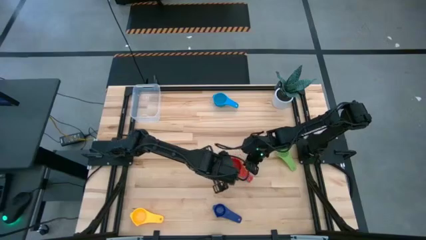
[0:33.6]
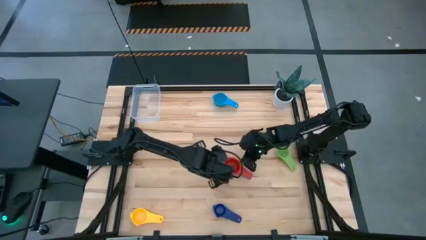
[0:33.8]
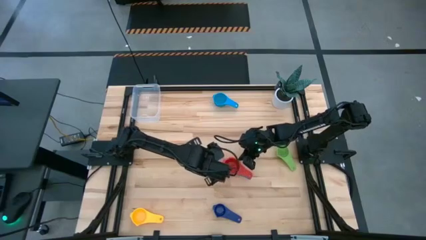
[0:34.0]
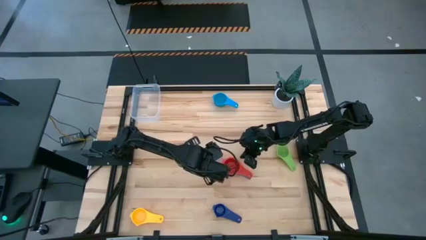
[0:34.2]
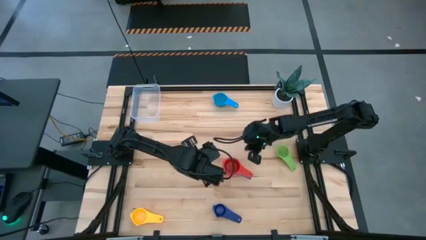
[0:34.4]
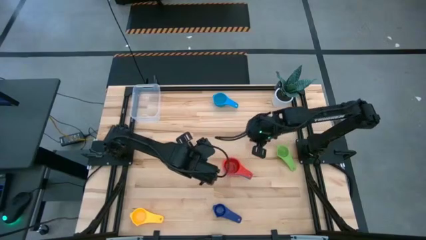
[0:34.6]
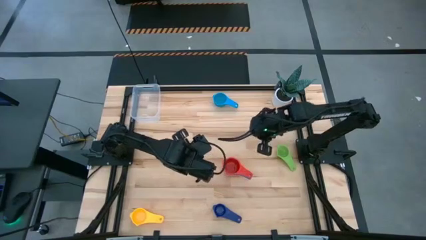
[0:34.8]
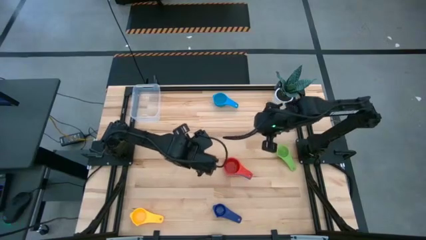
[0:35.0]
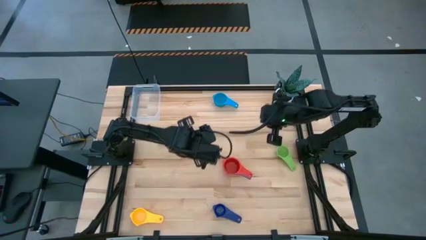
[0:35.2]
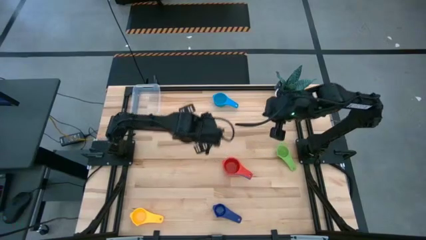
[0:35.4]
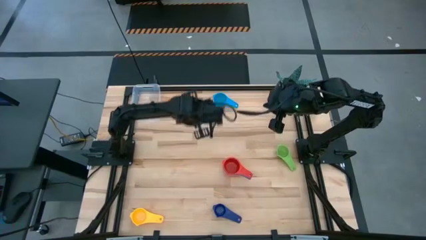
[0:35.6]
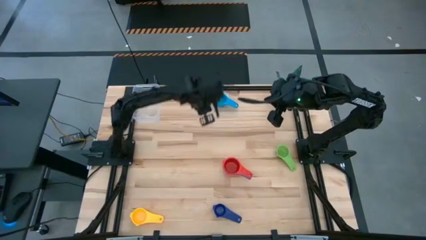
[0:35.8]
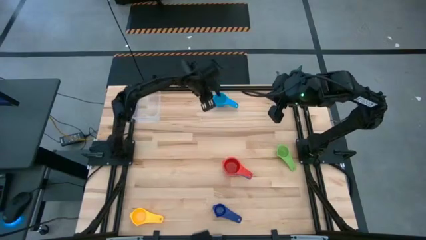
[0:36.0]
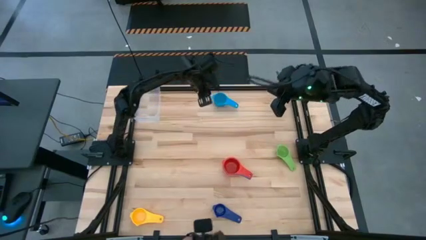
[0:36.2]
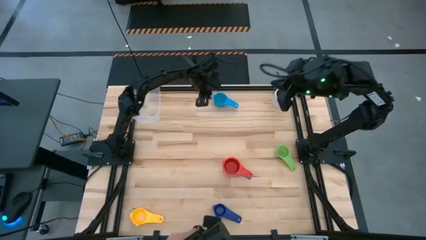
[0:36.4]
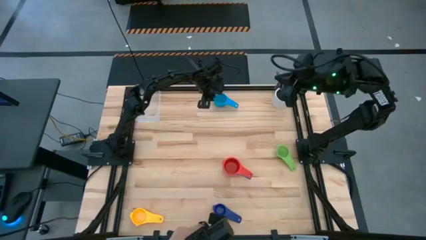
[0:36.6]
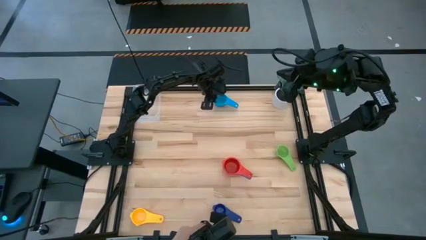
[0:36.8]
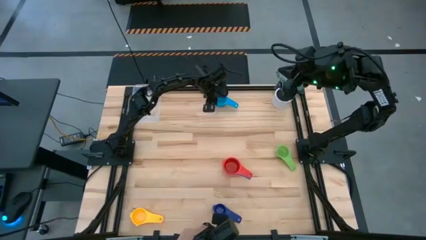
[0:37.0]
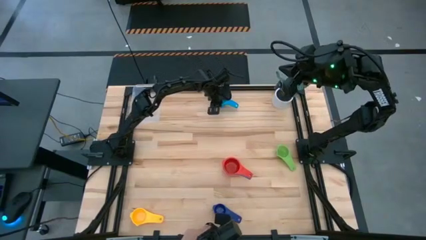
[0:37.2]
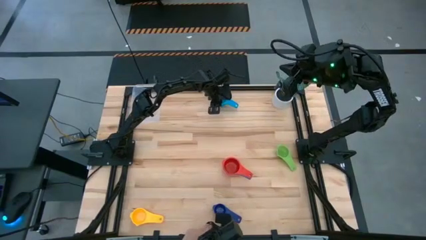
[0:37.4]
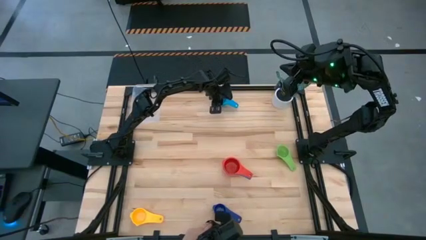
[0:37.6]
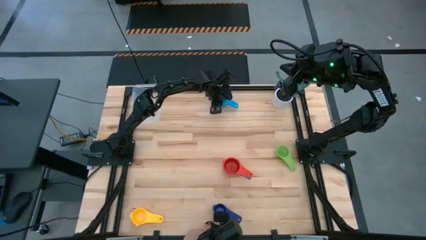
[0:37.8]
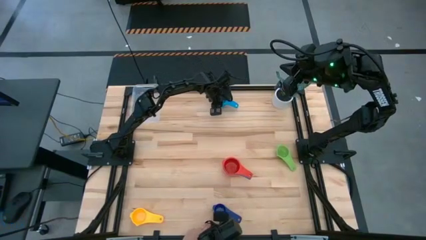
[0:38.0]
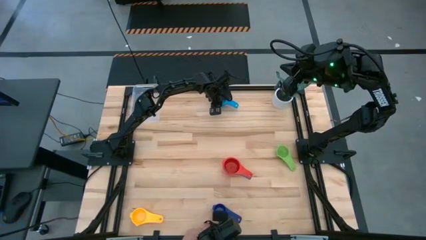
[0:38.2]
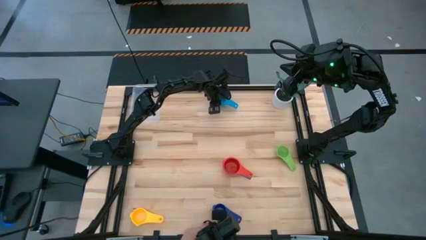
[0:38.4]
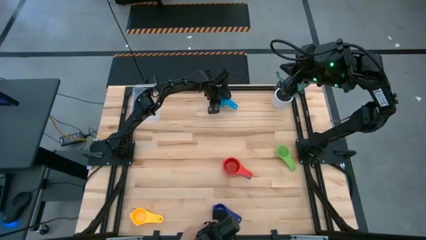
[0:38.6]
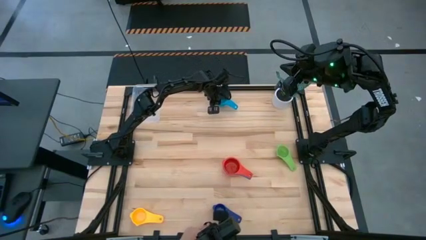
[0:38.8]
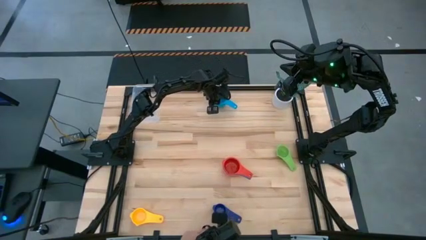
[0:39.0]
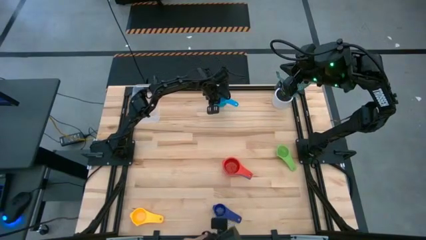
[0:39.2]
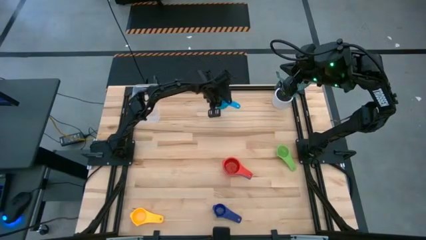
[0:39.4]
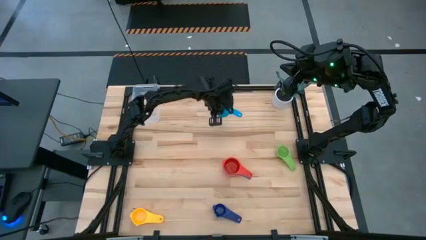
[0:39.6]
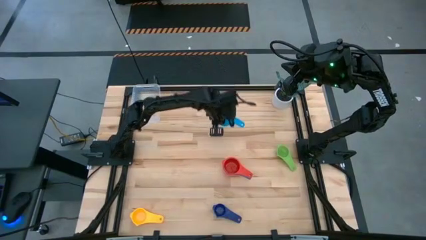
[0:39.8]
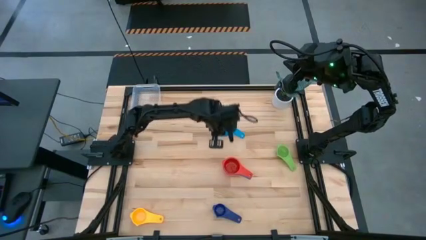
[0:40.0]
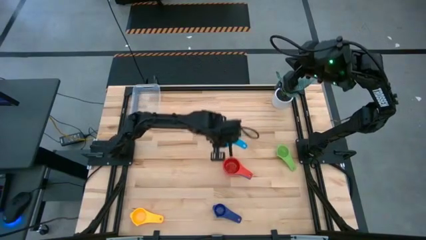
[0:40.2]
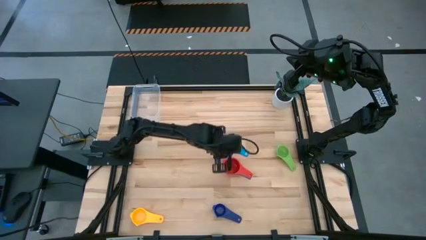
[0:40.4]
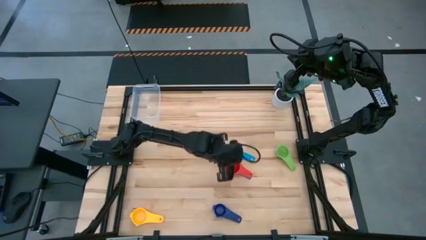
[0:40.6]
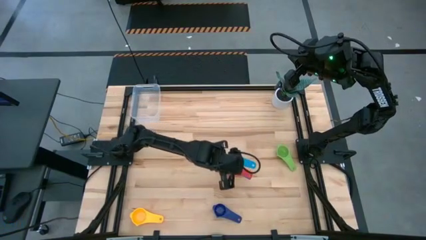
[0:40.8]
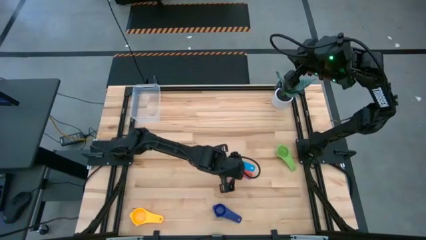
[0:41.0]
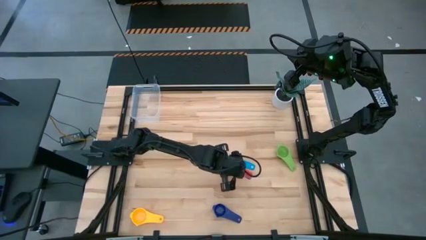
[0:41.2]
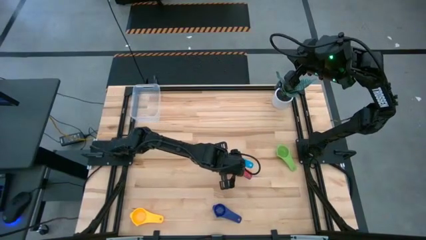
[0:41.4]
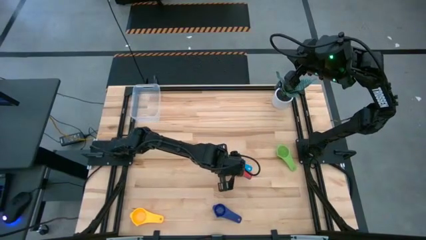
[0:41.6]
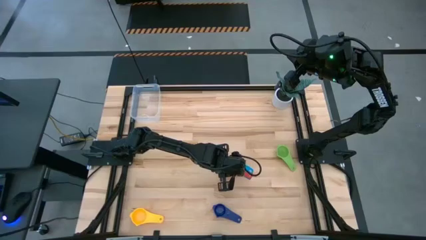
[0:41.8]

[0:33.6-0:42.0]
Task: Nest measuring cups in basket
Stack the light blue measuring cup on the red measuring cup

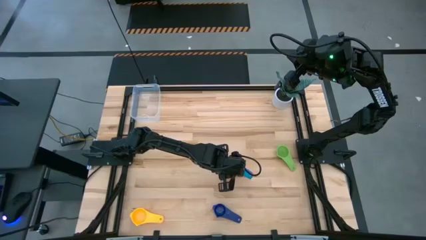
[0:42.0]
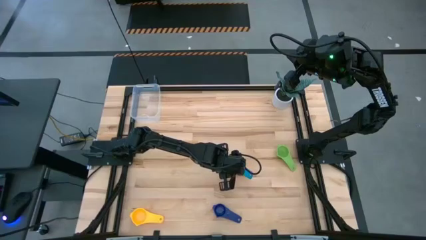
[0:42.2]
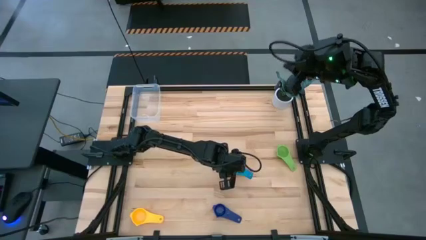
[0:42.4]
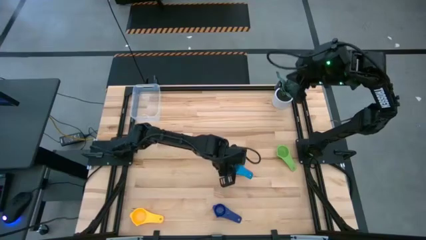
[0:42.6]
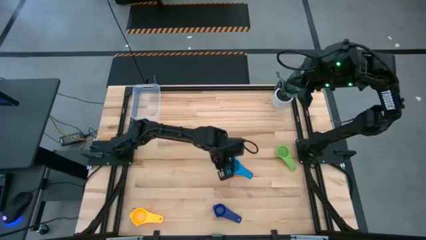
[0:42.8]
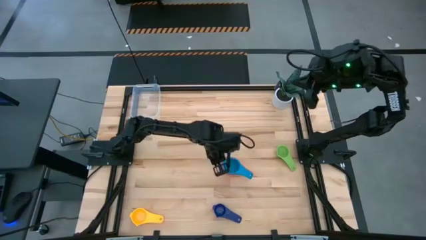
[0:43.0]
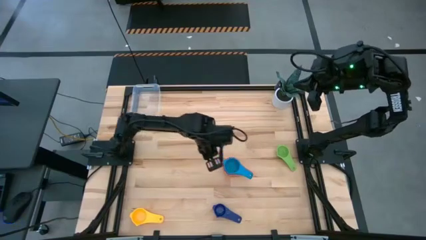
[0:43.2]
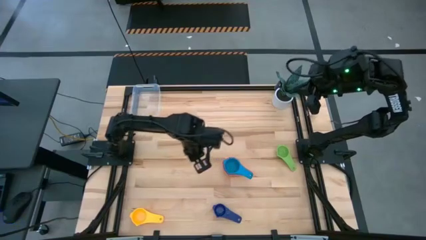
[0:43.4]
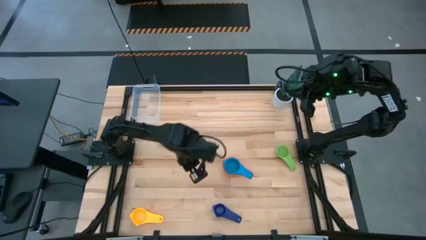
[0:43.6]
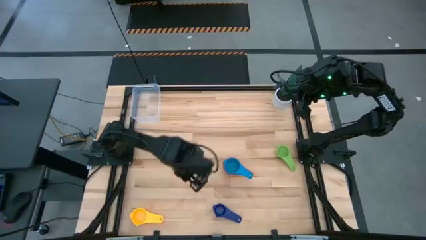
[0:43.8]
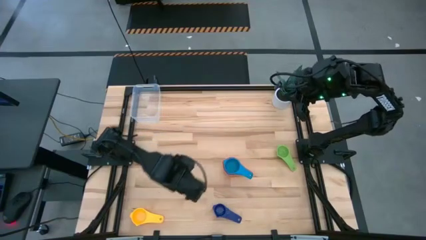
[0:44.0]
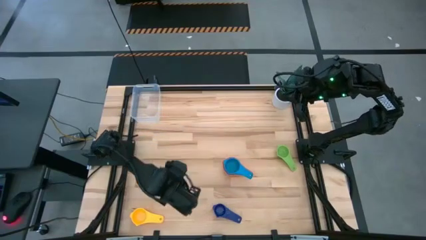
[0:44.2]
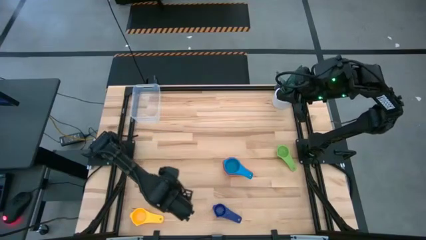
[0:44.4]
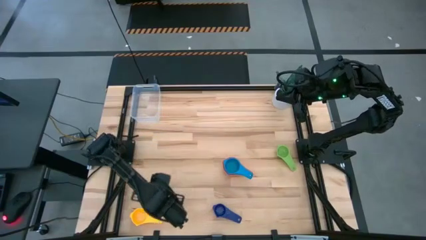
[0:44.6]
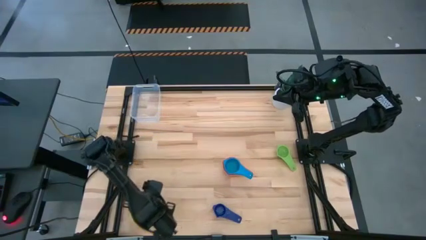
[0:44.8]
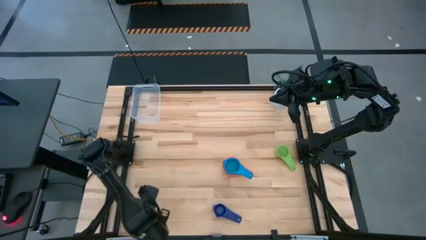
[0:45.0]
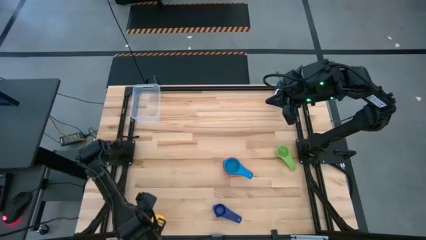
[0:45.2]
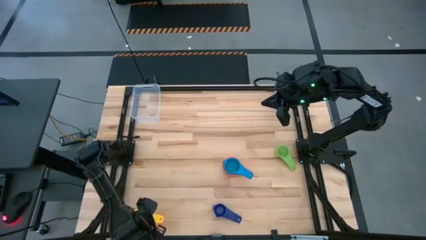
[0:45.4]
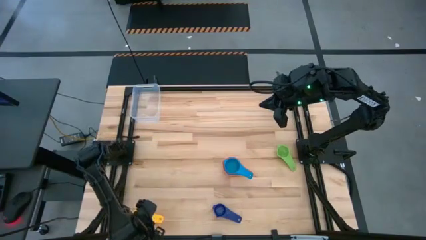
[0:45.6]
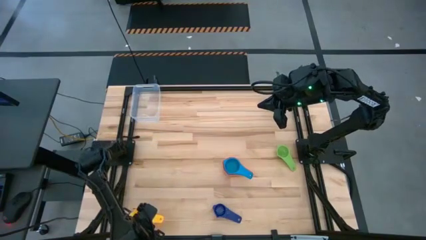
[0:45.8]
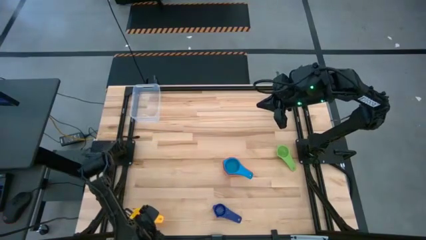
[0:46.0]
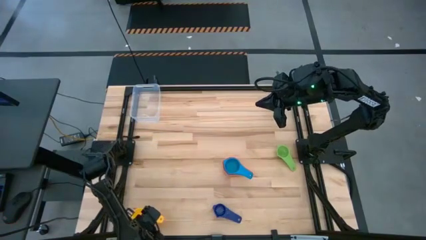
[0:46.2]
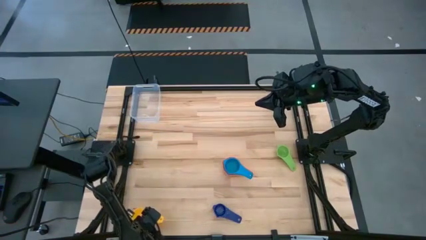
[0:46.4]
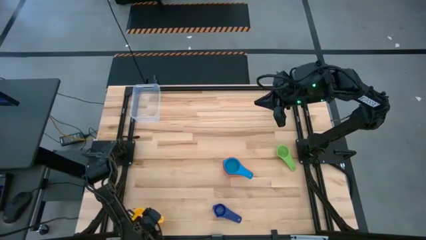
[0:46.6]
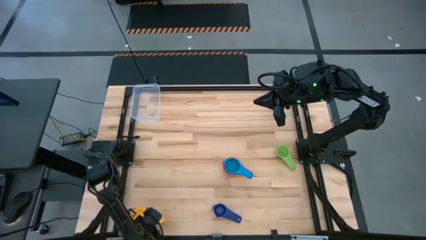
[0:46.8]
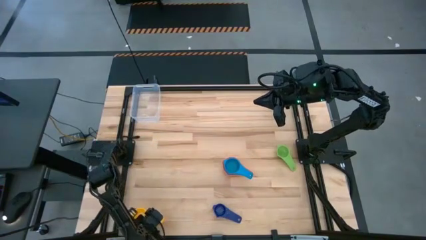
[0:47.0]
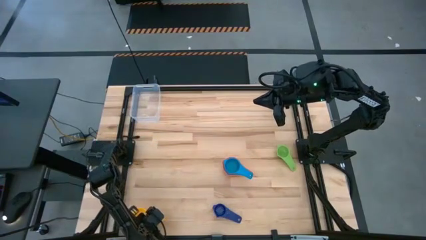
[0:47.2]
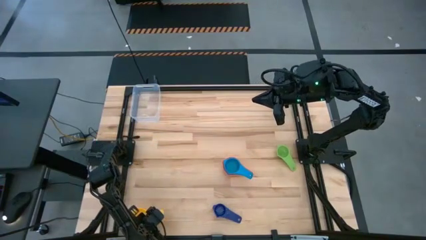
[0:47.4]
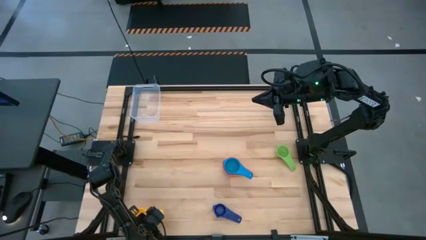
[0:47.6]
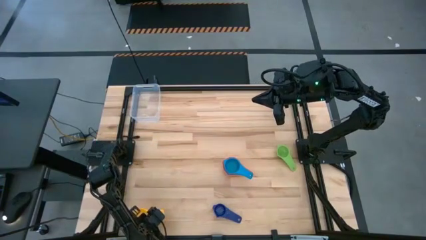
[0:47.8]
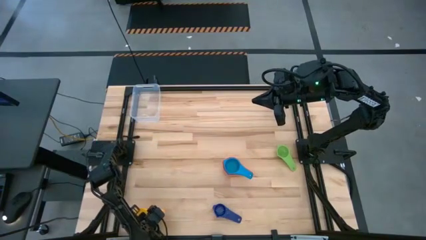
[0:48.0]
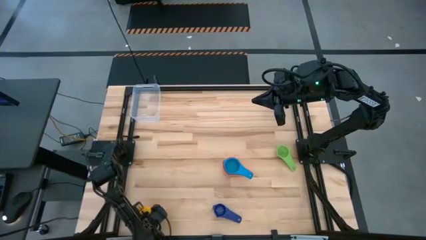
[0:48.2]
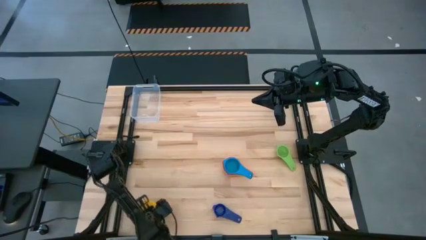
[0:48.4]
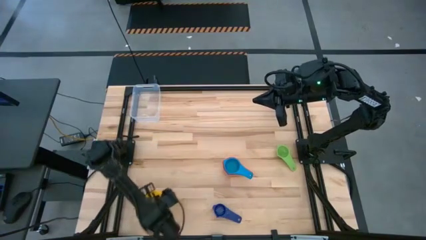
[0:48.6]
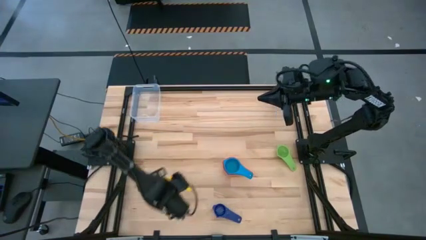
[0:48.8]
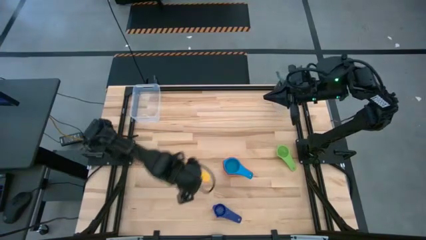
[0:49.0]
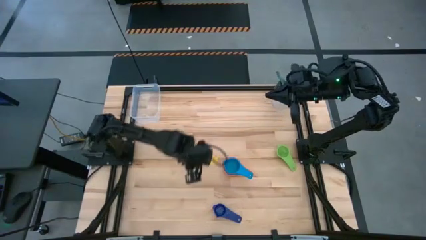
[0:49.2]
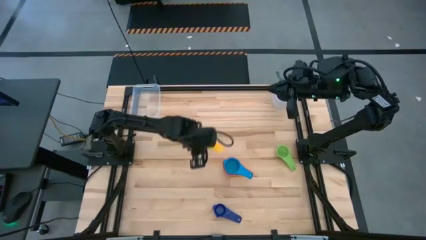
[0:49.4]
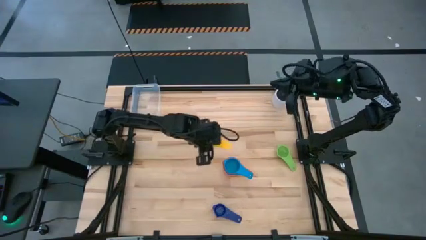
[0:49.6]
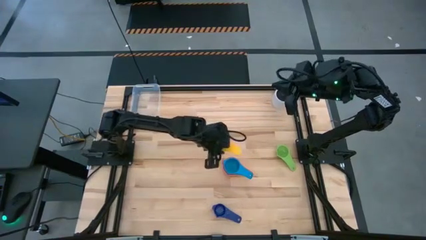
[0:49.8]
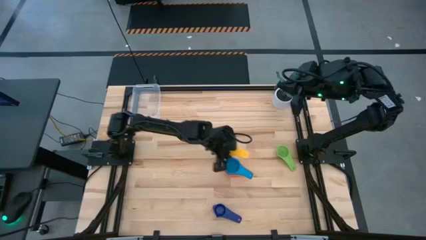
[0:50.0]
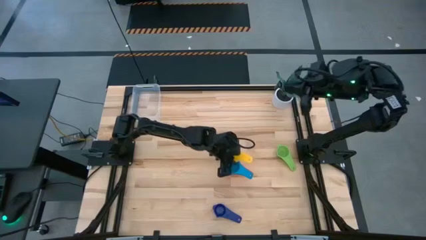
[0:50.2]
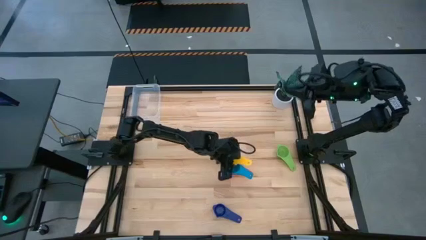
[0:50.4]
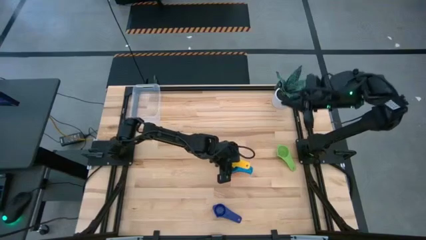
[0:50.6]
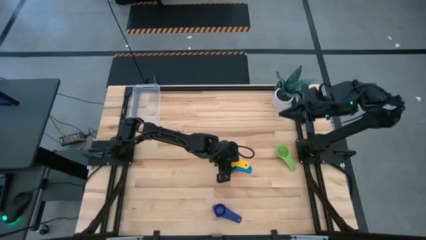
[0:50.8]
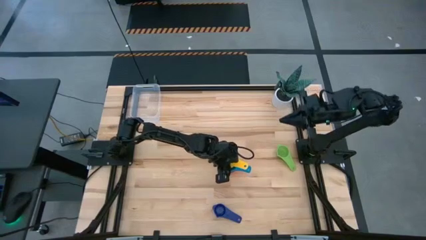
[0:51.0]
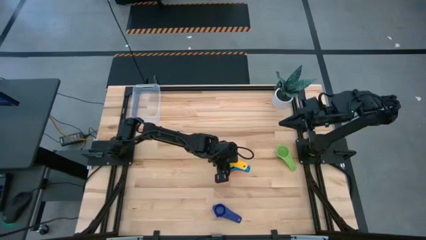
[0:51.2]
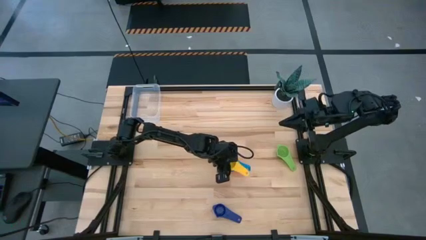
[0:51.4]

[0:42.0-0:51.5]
Stack the yellow measuring cup on top of the light blue measuring cup
